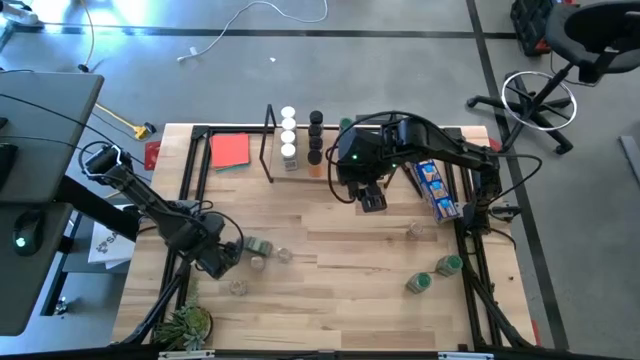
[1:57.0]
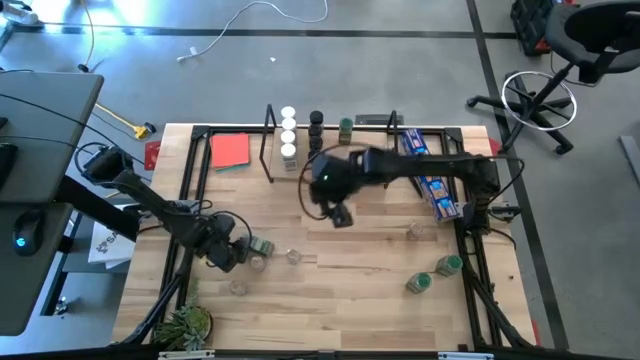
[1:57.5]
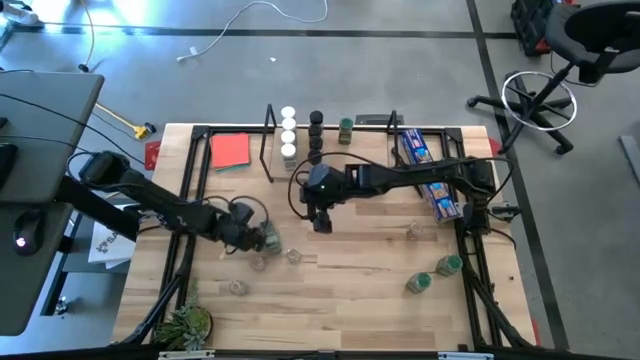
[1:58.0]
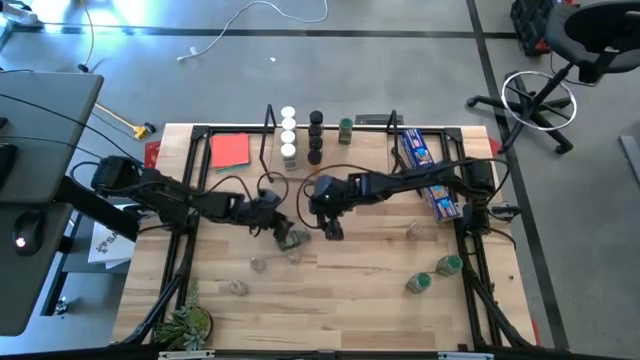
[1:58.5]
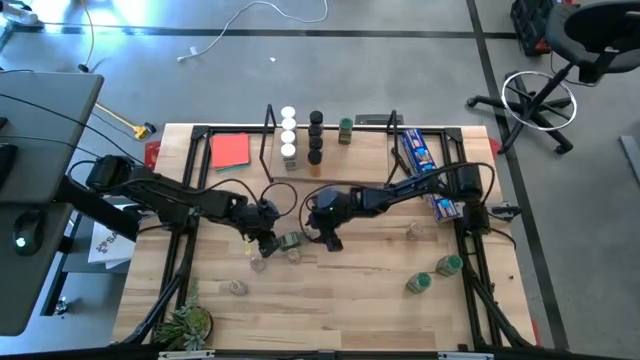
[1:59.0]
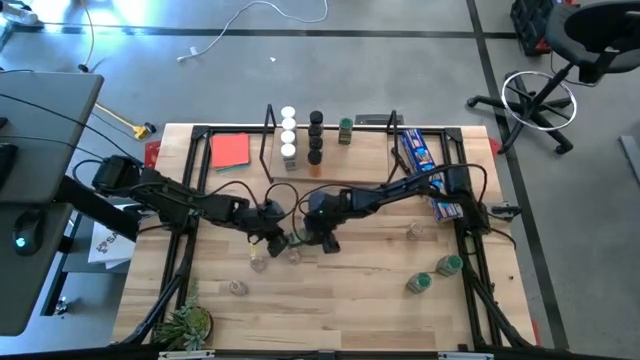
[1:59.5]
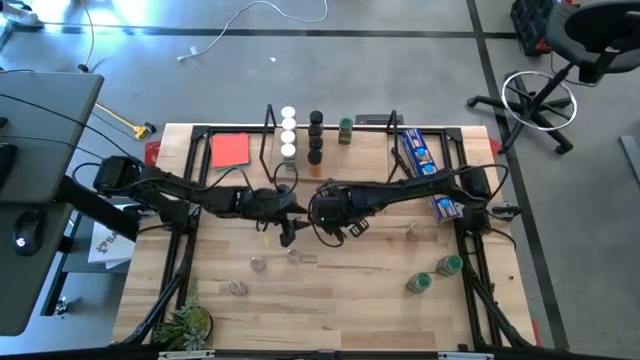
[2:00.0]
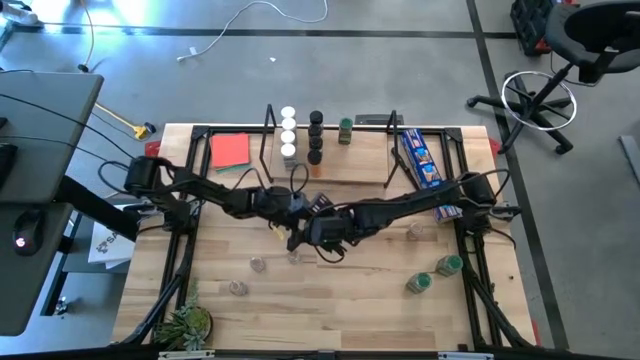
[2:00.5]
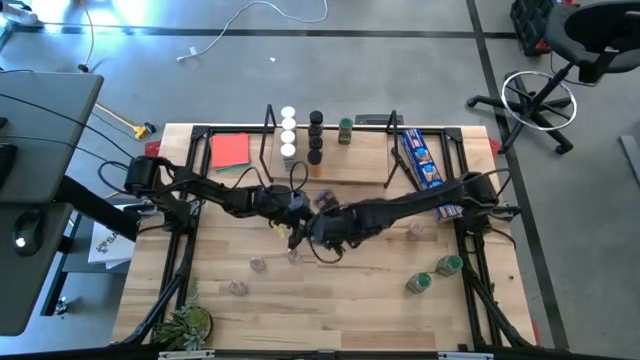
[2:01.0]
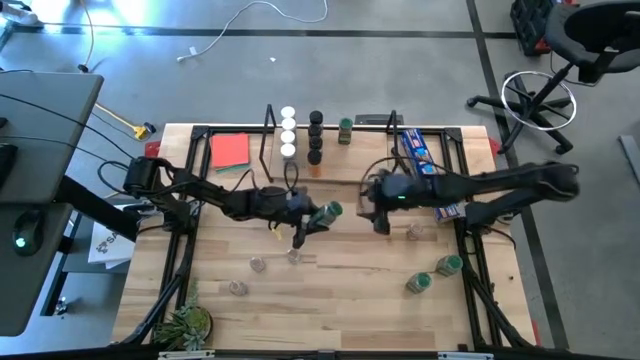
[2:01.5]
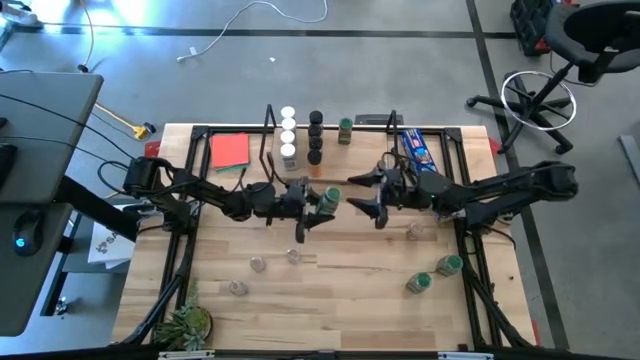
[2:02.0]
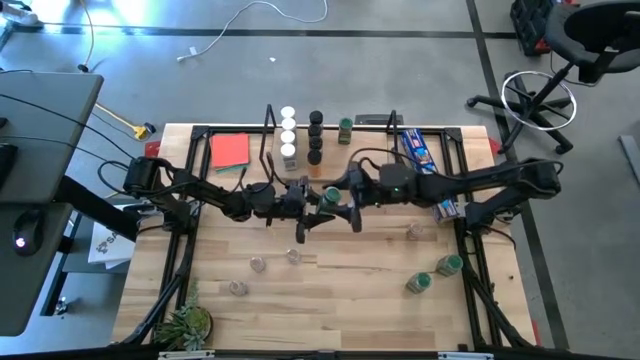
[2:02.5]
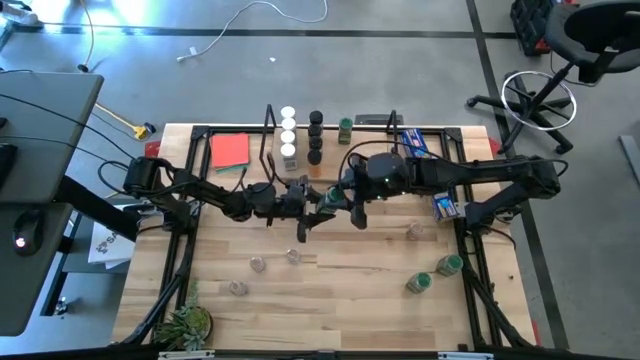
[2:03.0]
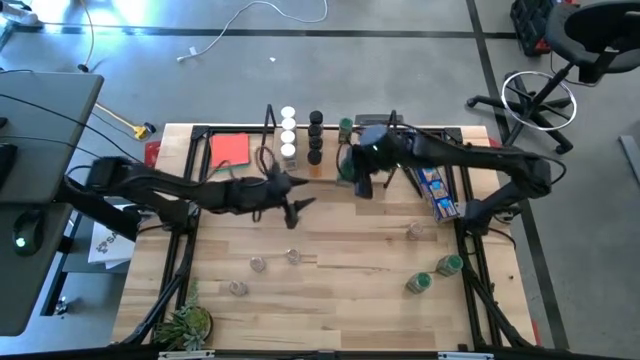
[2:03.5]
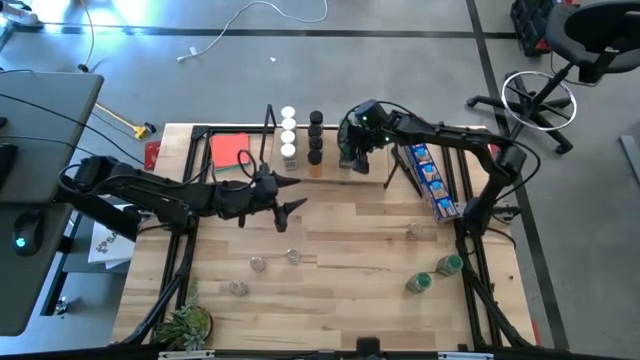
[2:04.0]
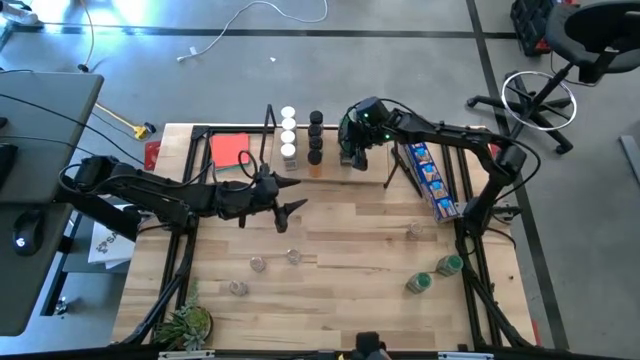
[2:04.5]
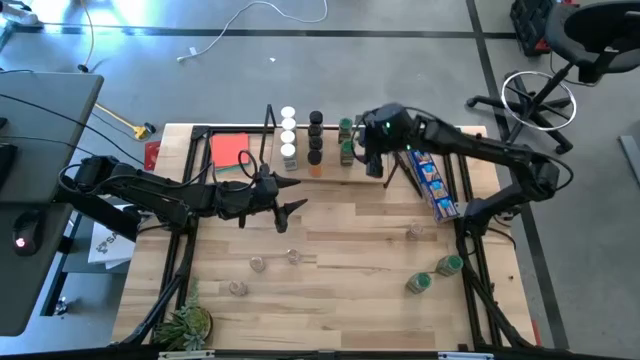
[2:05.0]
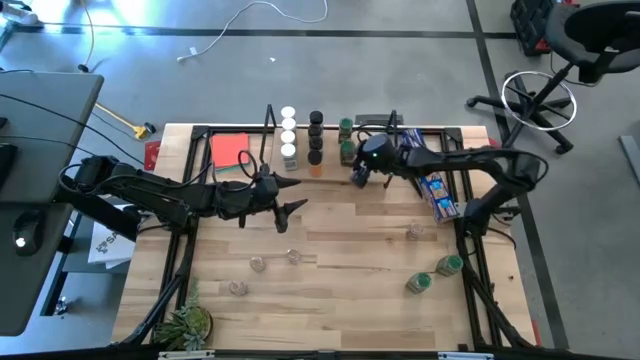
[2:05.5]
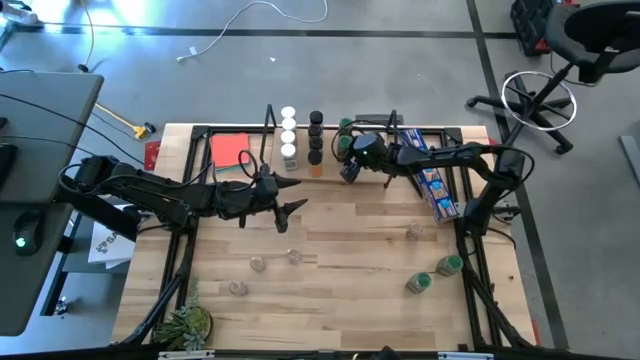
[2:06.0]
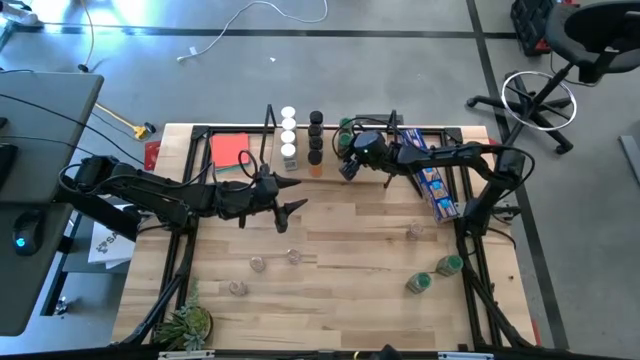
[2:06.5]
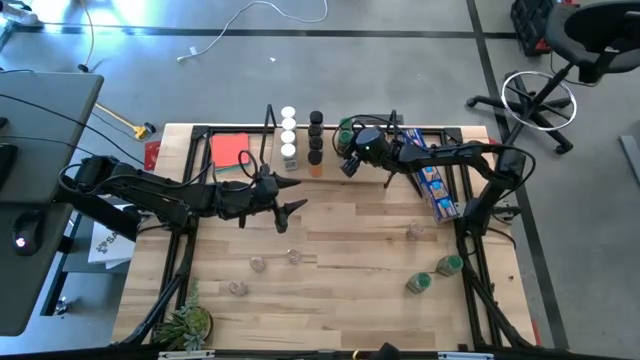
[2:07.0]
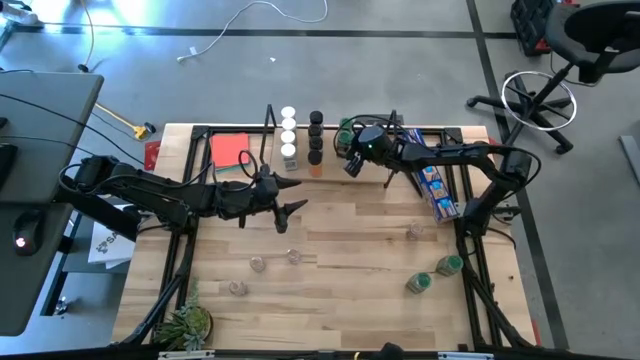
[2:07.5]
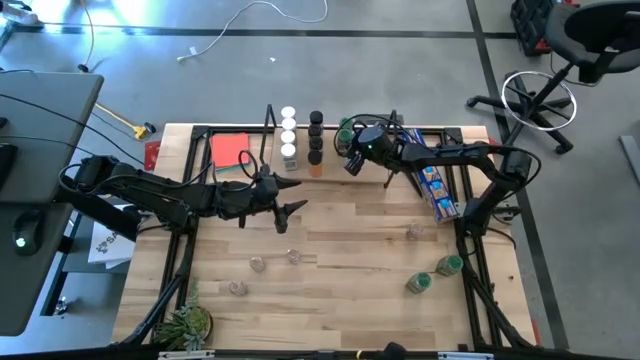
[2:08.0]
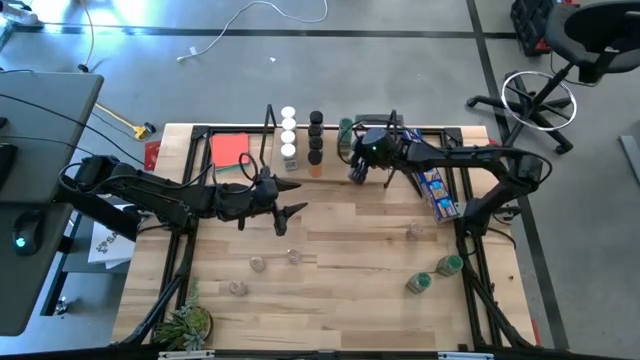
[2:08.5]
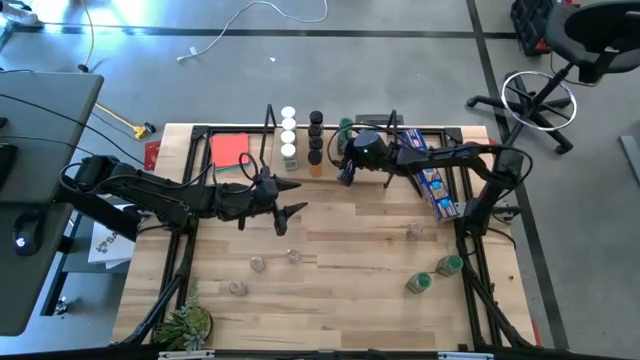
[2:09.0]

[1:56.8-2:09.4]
Task: Shelf spices
Put the green seasoning bottle on the shelf aligned with the other green seasoning bottle

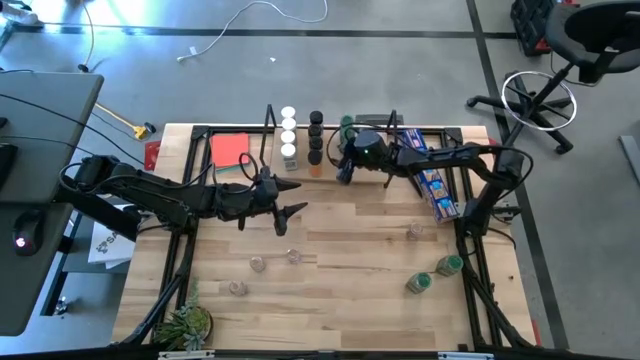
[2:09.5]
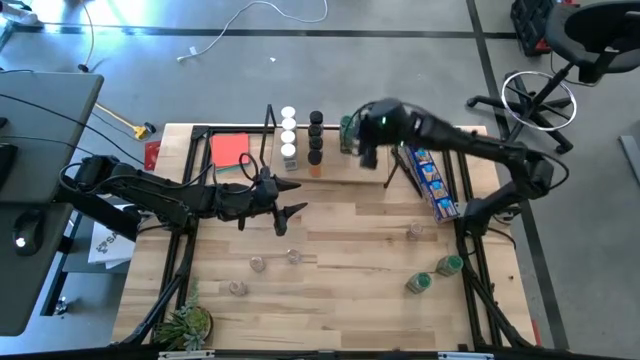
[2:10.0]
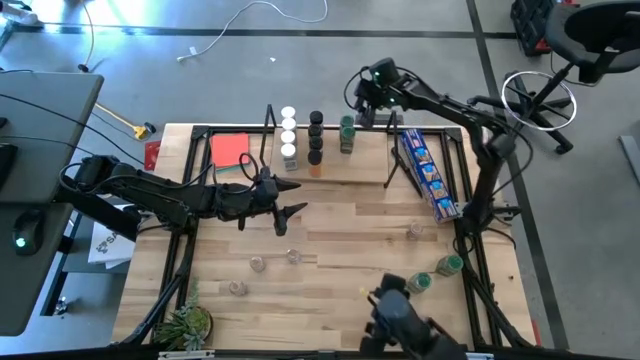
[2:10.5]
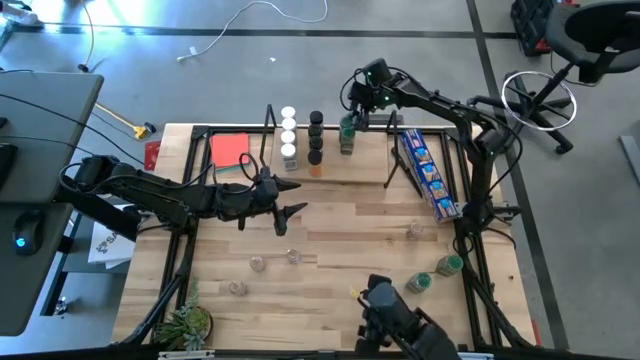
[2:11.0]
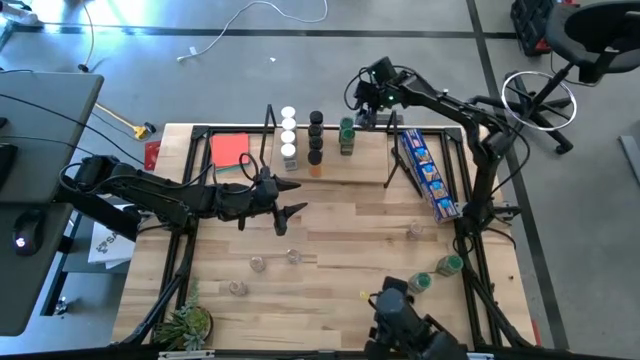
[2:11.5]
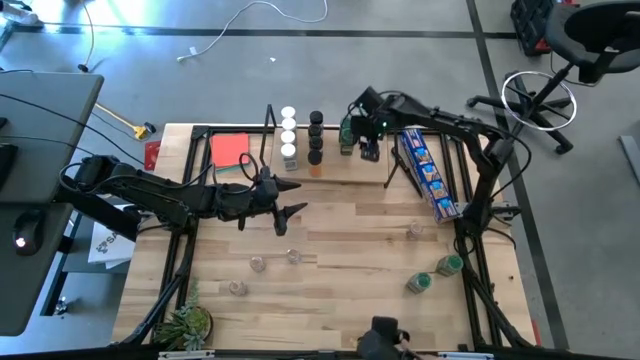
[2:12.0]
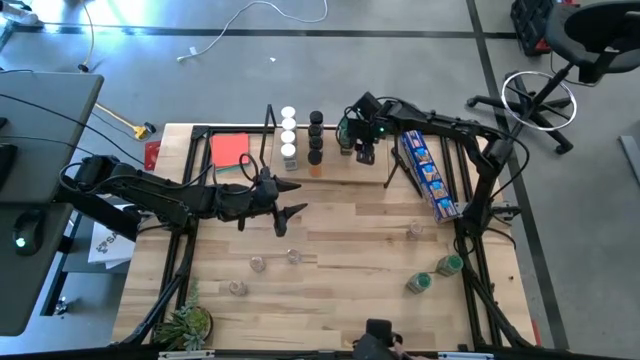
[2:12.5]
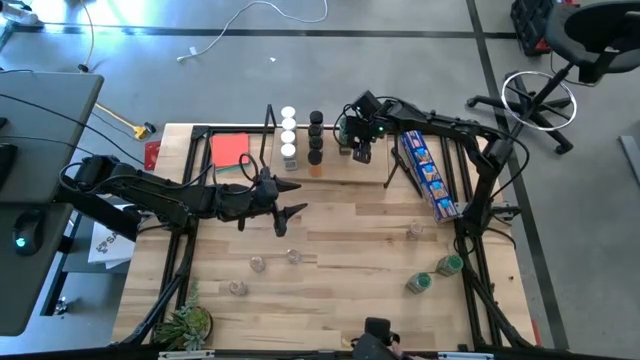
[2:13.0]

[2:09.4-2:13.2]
Adjust the green seasoning bottles on the shelf

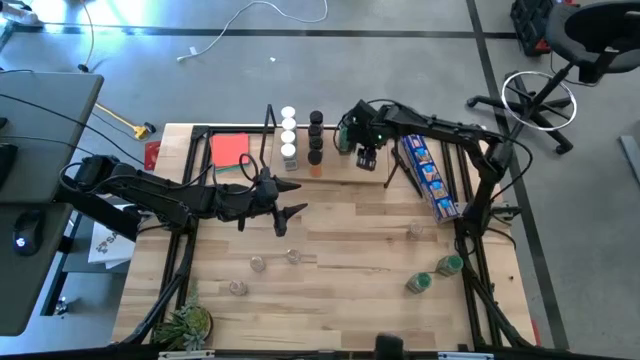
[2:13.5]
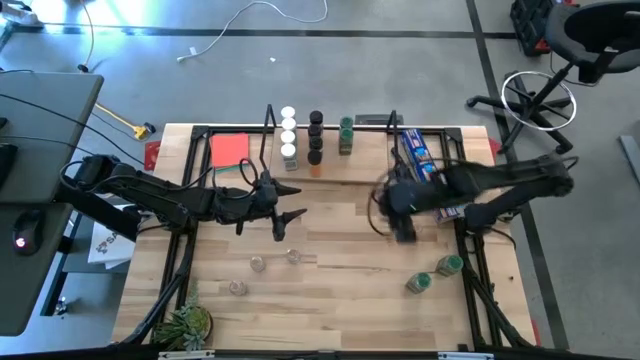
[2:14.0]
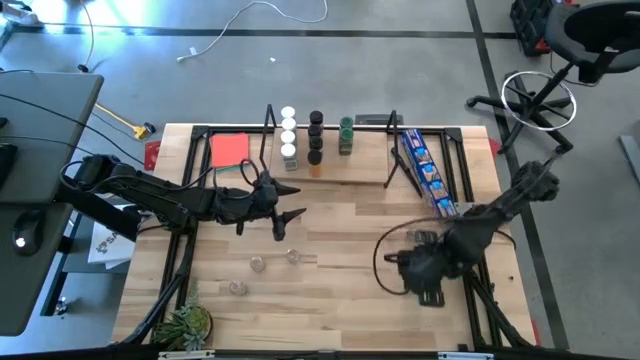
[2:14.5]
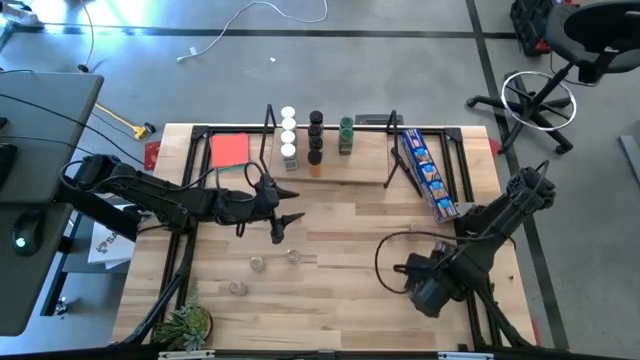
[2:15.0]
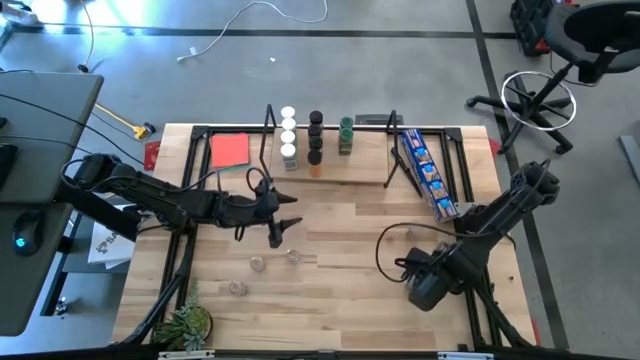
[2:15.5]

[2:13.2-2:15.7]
Put the green seasoning bottle on the shelf aligned with the other green seasoning bottles

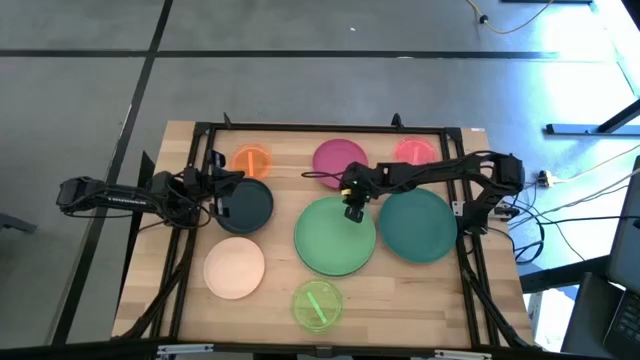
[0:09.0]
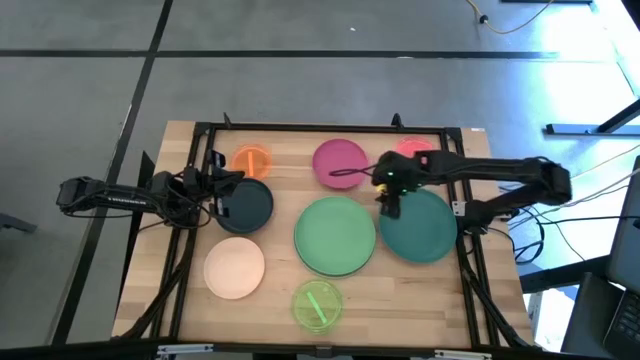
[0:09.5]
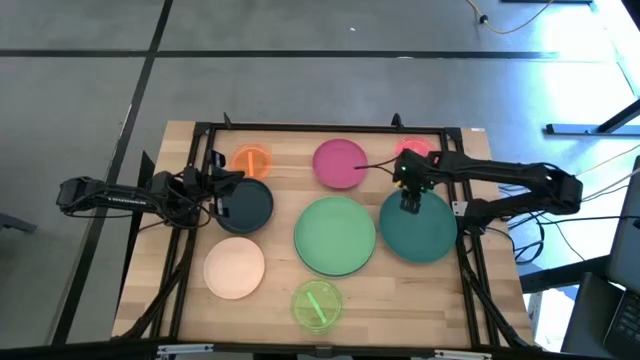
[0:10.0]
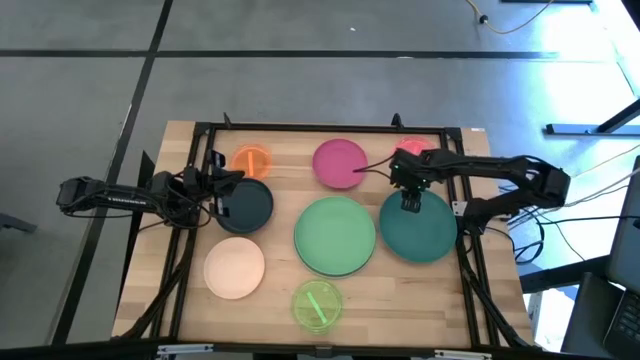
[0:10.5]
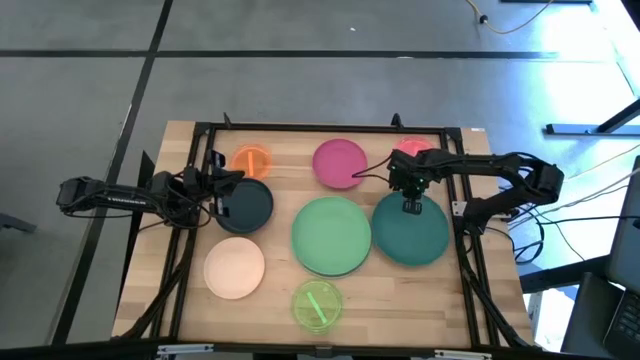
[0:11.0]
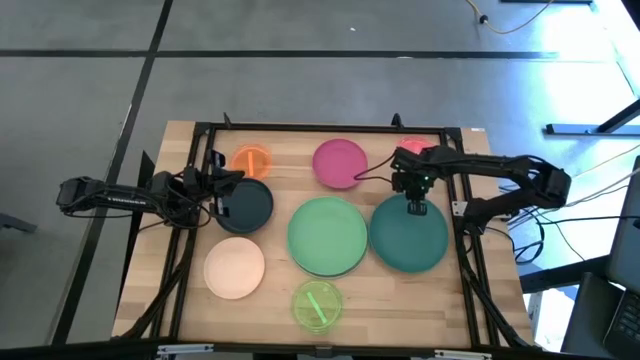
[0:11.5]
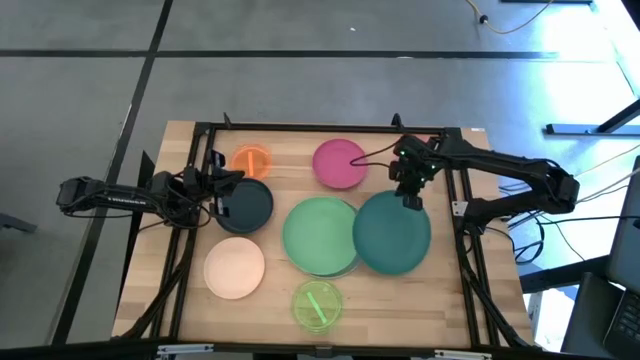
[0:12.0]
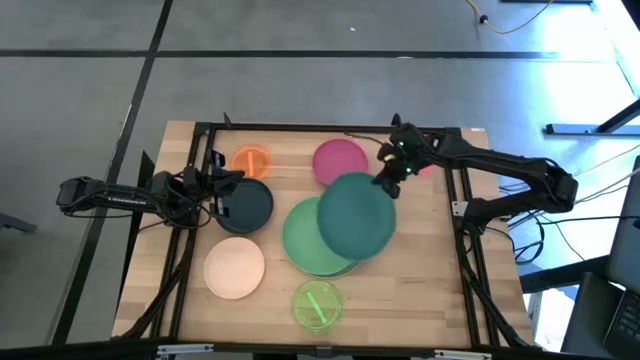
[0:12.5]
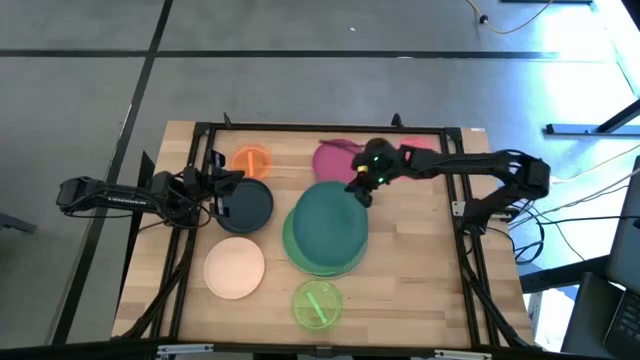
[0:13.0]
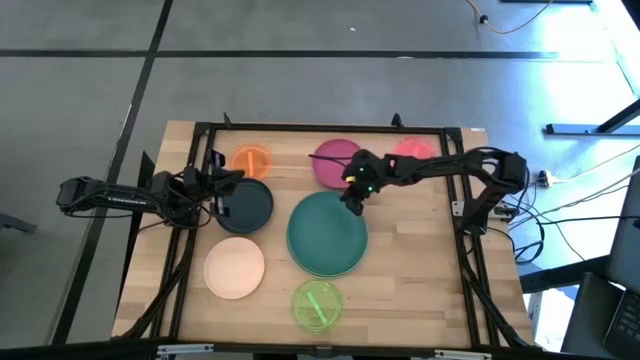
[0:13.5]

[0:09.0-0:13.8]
Task: Stack plastic plates
Stack the dark green plate on the light green plate
